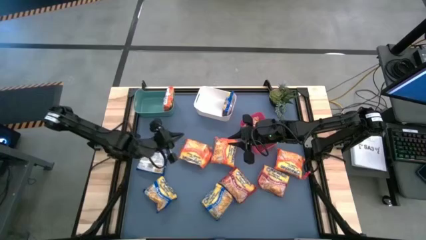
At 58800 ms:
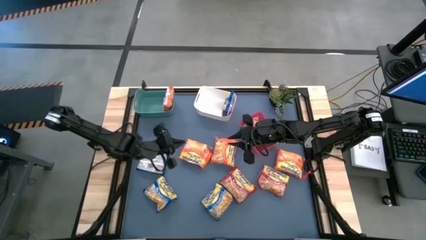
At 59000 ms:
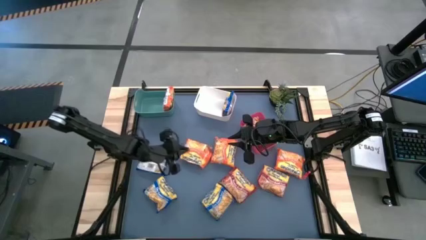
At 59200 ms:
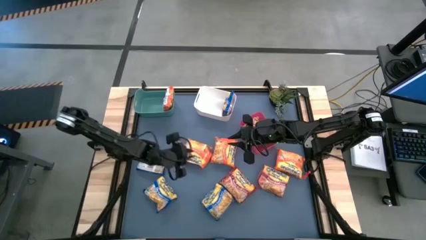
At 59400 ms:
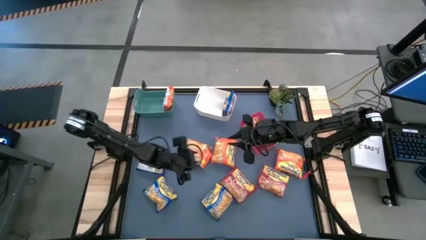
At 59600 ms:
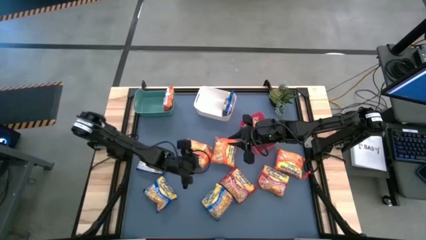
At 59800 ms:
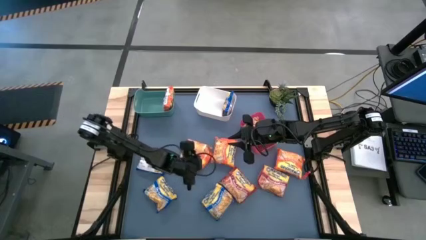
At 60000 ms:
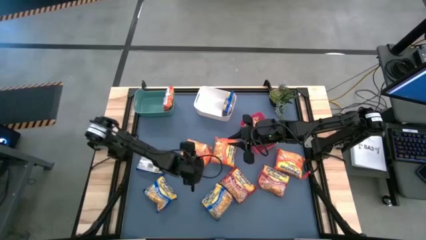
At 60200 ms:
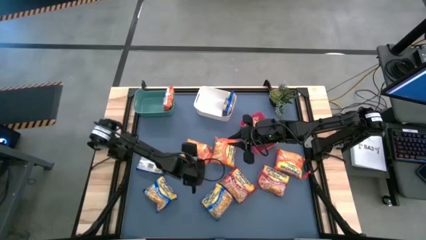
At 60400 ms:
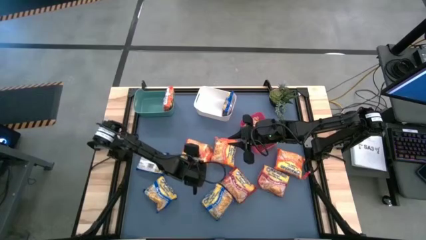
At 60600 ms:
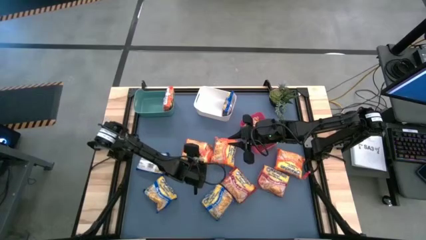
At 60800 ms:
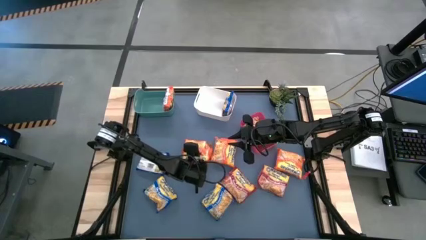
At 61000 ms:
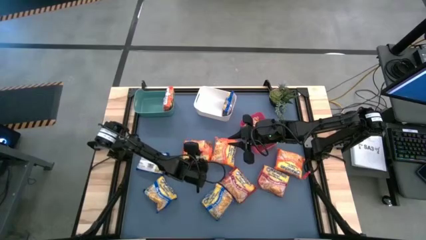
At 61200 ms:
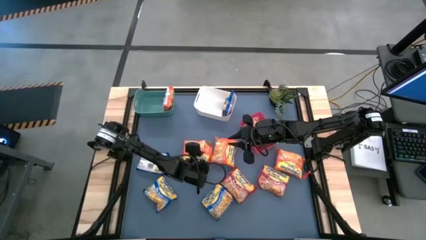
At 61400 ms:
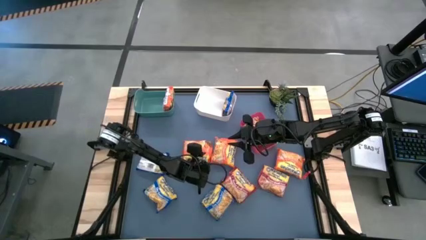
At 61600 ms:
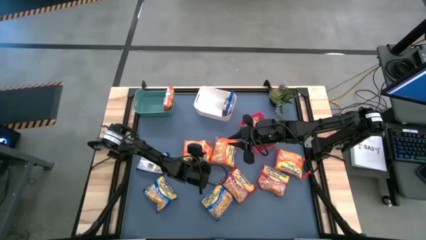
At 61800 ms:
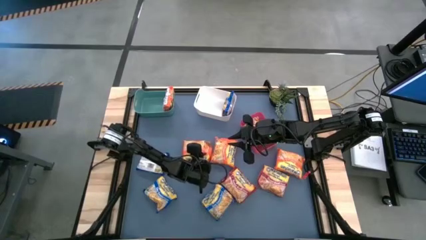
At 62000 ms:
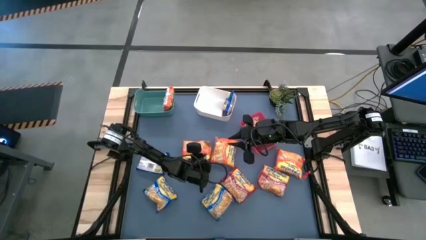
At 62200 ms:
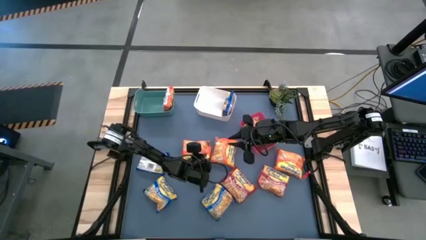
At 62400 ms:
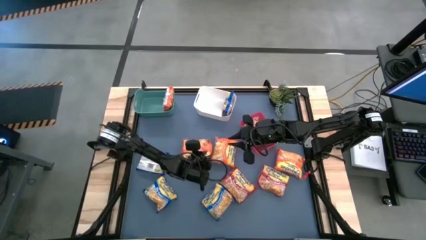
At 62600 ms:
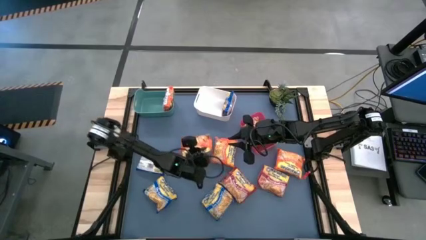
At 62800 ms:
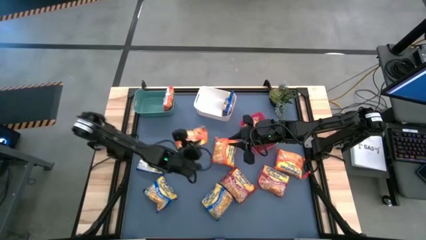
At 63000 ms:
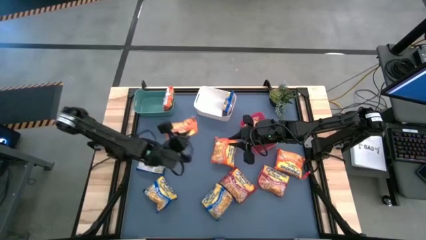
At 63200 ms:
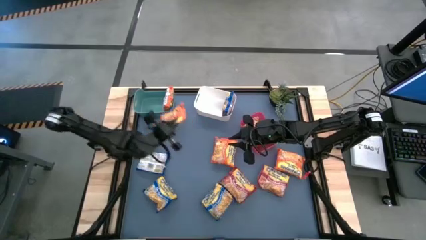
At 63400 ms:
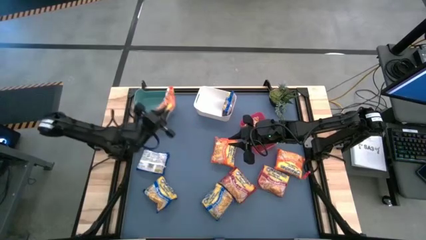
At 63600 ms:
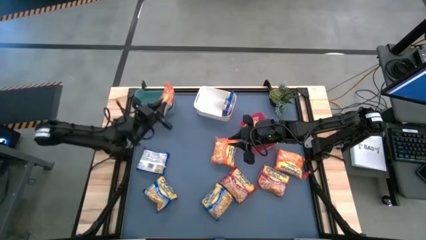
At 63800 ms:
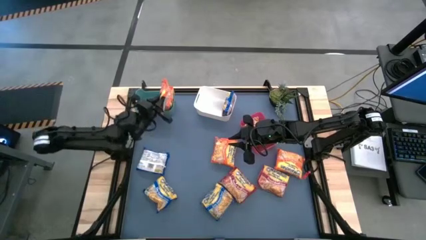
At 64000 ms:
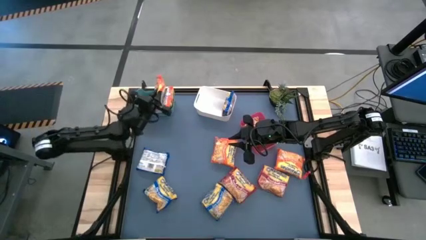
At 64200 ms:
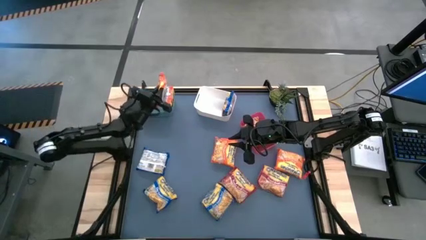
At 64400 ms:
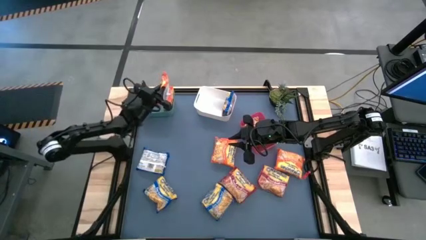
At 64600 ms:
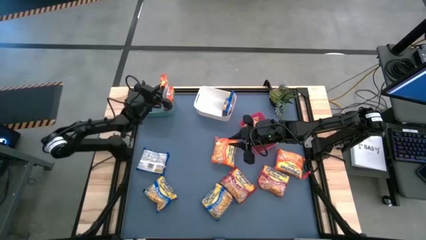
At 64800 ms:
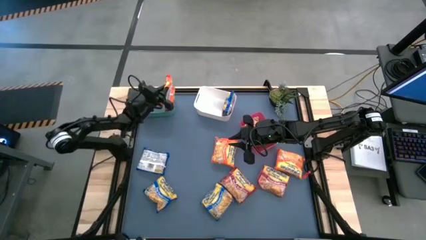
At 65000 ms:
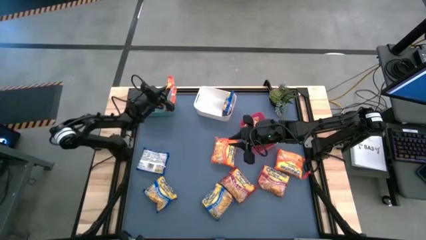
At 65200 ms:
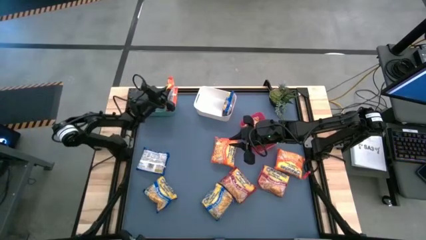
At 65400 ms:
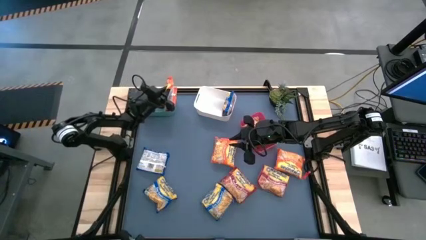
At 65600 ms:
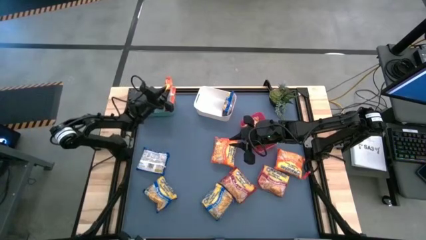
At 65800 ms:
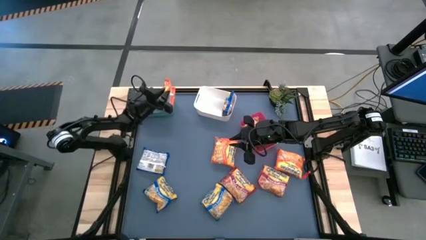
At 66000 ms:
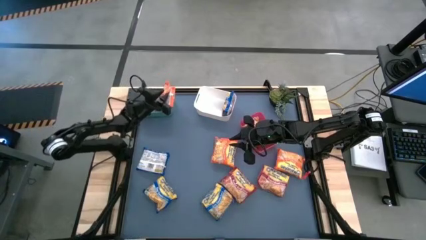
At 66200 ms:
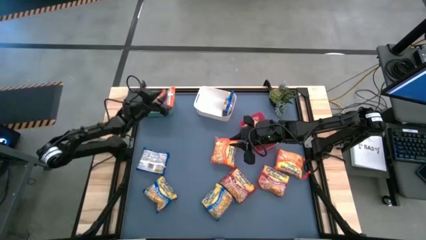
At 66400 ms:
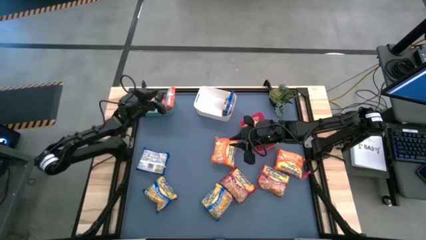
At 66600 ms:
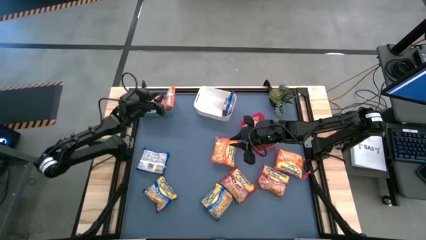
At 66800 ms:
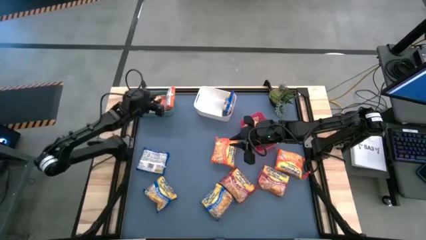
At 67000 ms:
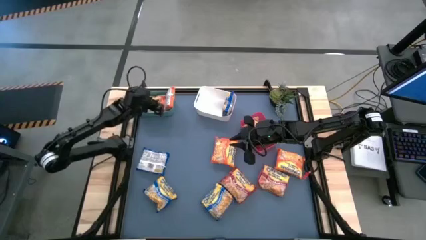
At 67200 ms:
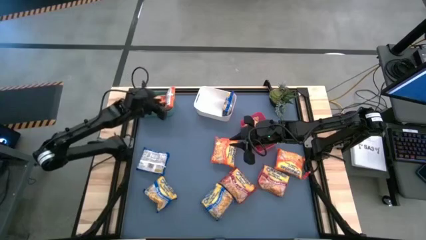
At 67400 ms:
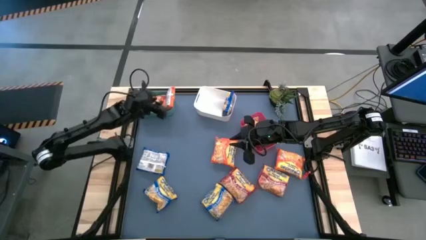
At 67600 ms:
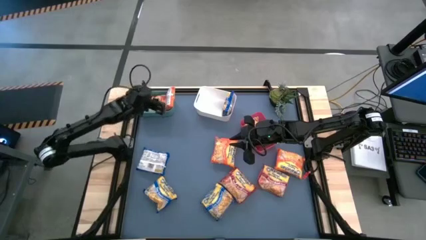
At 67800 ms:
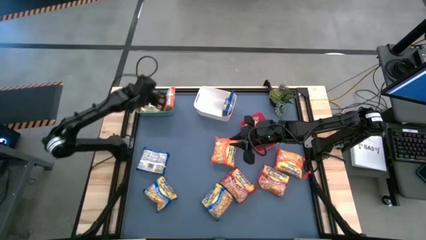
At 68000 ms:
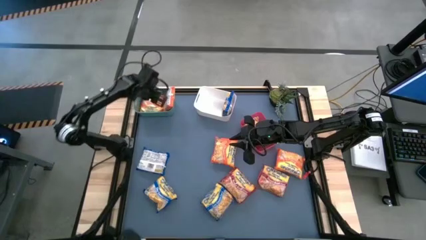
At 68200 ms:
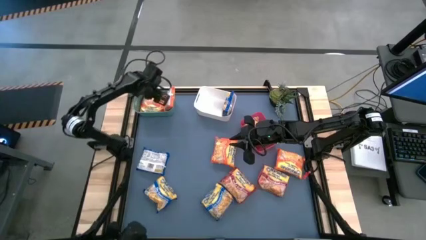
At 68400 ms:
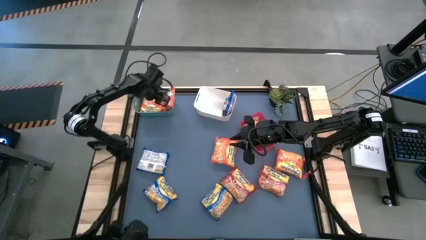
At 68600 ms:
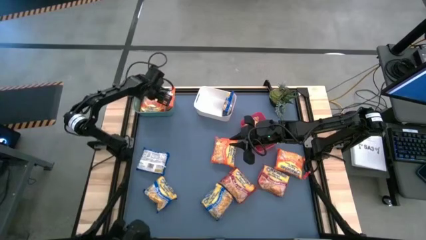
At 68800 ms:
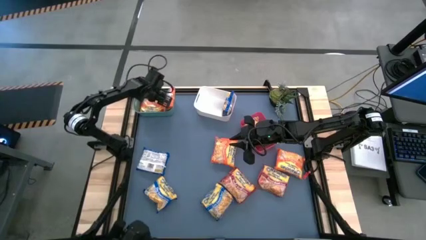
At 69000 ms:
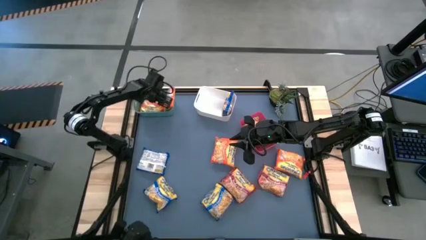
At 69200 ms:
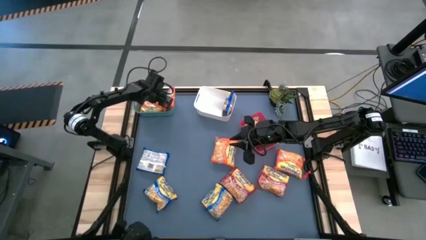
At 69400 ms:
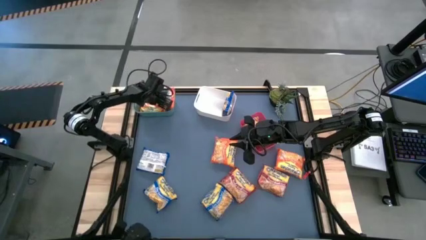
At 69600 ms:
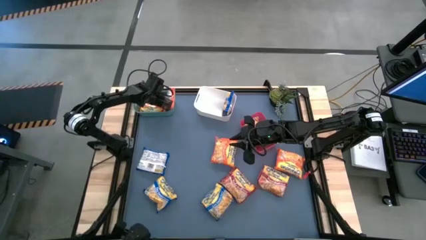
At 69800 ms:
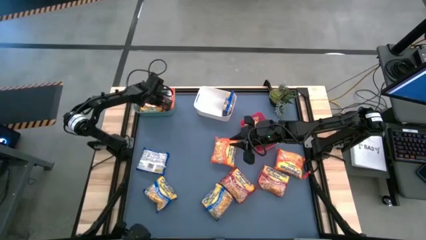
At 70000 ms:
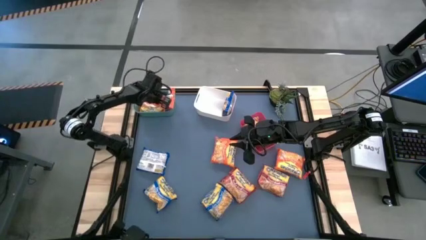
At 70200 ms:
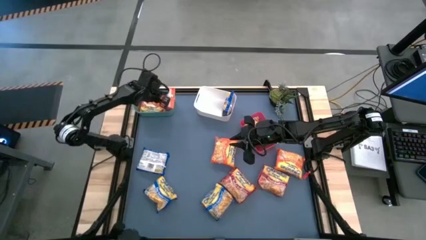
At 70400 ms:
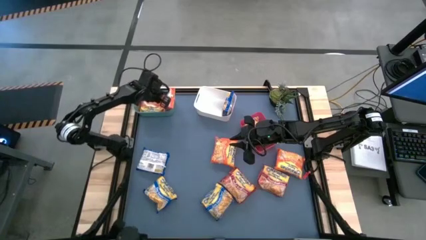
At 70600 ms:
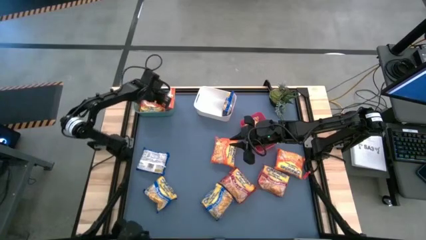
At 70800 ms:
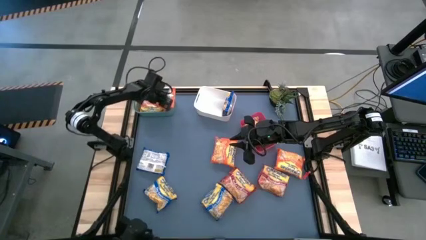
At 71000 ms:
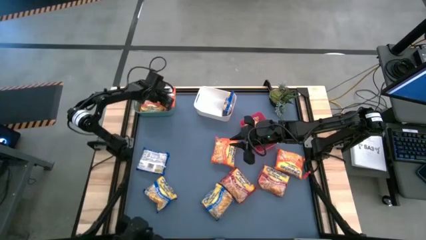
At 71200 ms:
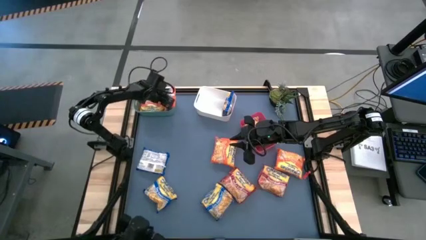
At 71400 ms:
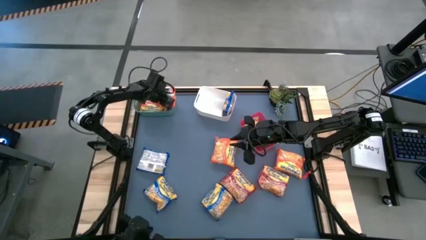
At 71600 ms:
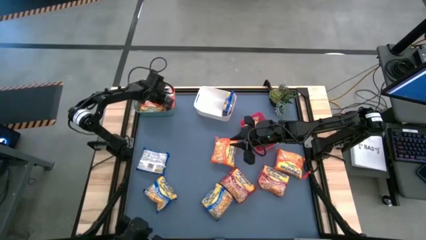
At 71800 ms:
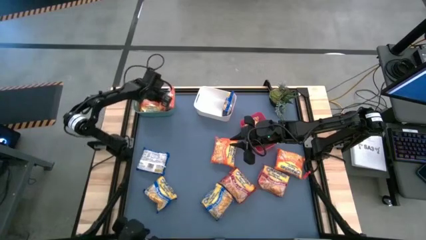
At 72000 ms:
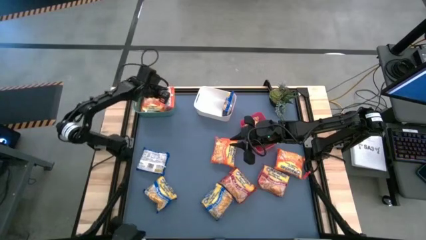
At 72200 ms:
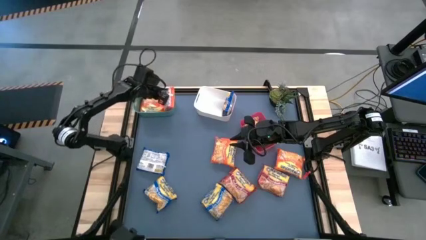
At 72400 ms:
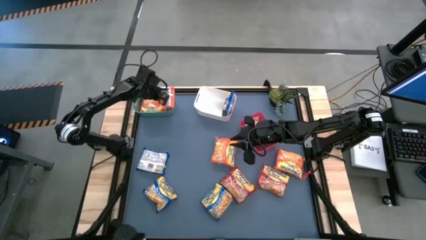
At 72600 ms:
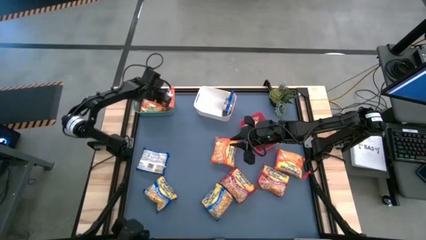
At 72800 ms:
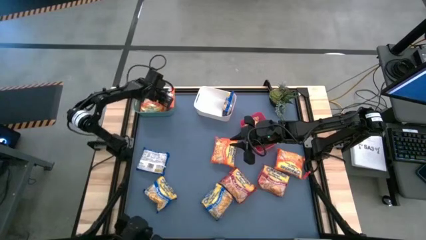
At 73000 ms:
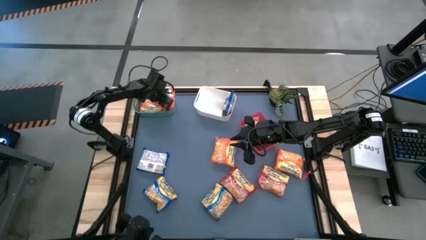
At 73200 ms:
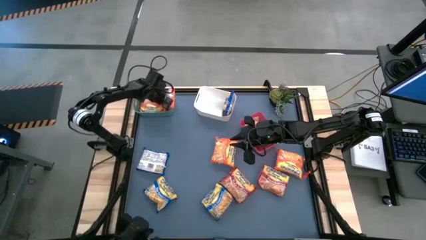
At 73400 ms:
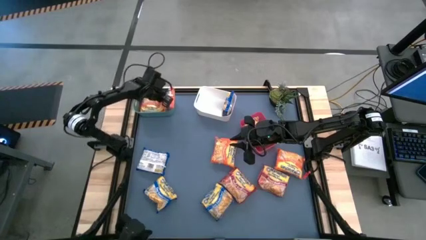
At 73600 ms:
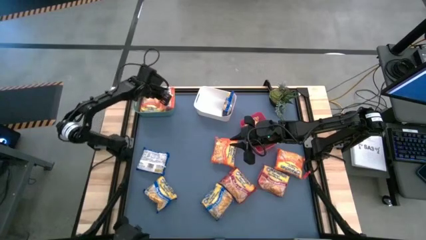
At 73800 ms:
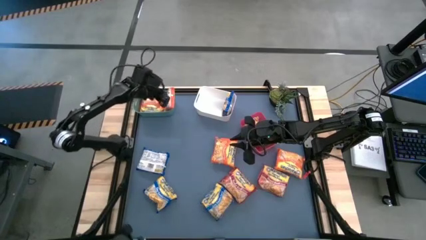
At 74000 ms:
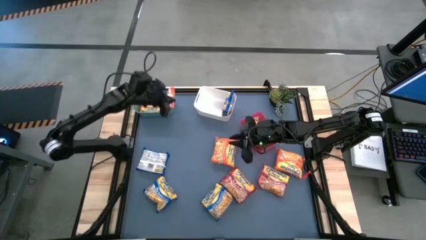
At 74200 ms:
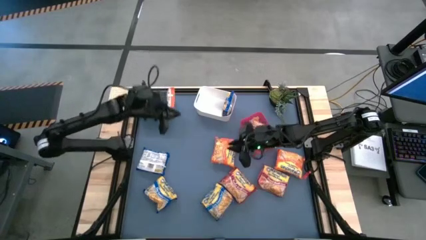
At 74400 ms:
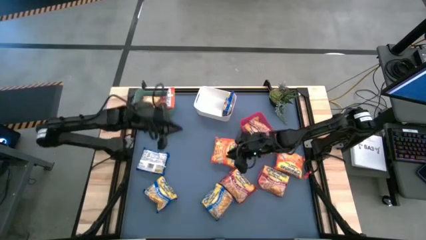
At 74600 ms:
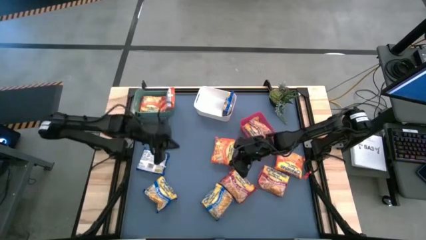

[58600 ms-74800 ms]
Task: Sort Maruchan noodles
Put the orange noodle pack into the green bin

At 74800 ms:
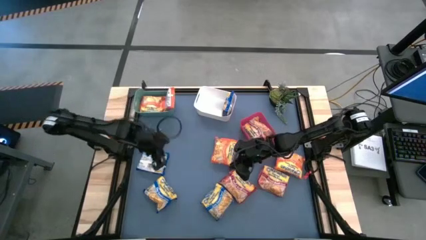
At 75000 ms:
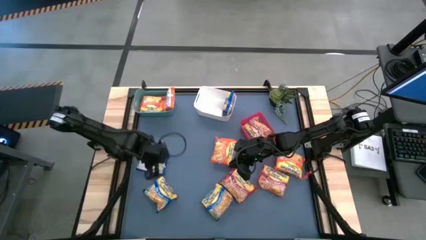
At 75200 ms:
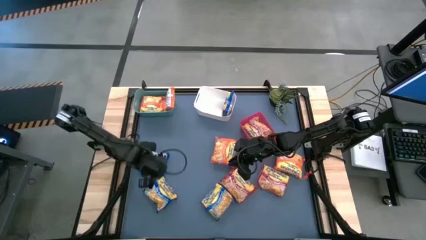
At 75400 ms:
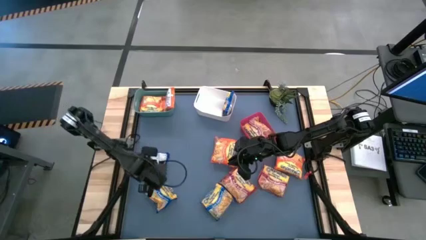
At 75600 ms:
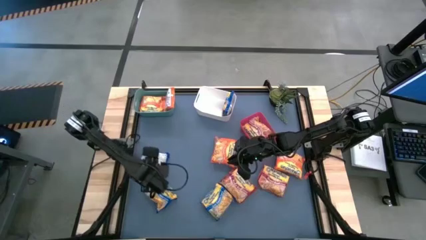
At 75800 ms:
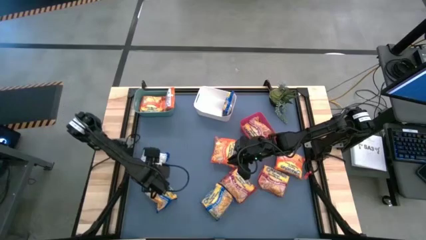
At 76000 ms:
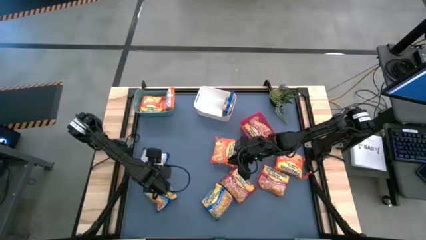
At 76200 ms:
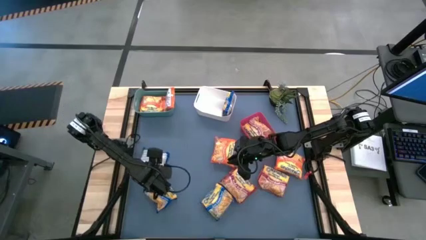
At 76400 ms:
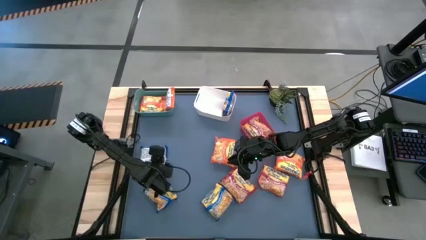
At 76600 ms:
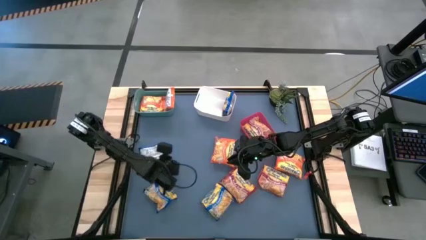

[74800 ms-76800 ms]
Put the blue noodle pack into the white bin
